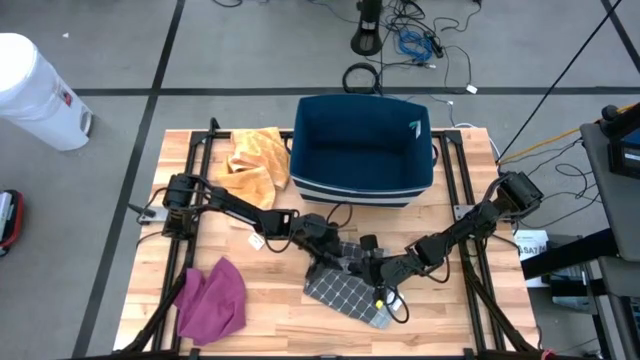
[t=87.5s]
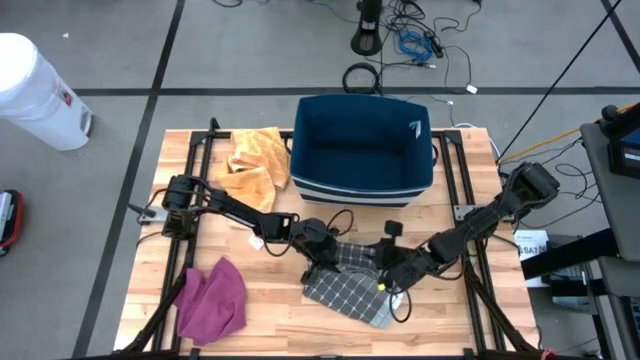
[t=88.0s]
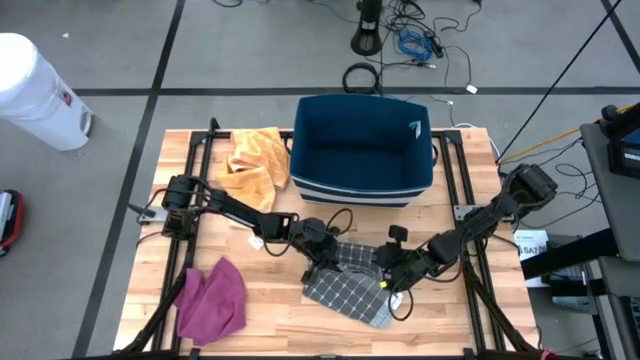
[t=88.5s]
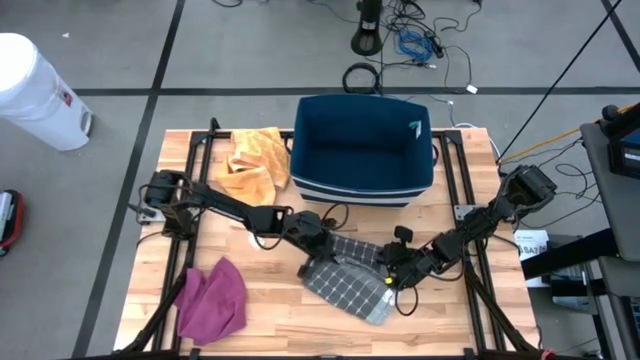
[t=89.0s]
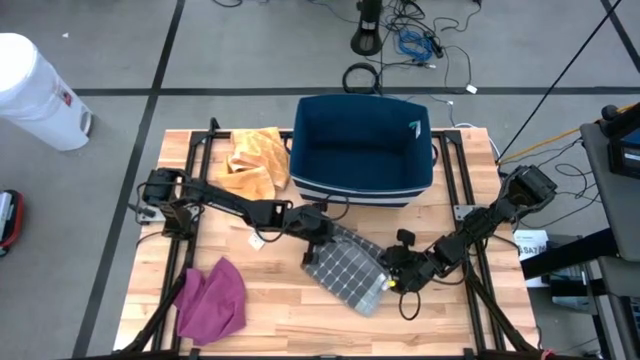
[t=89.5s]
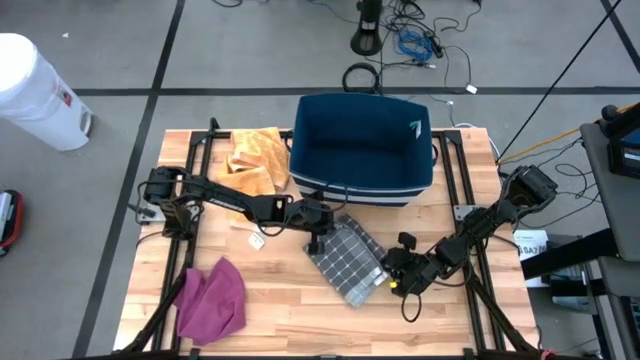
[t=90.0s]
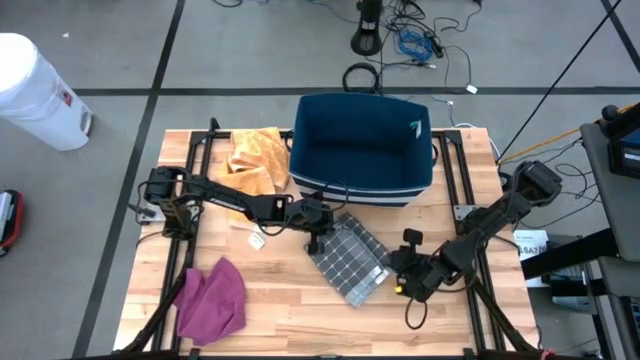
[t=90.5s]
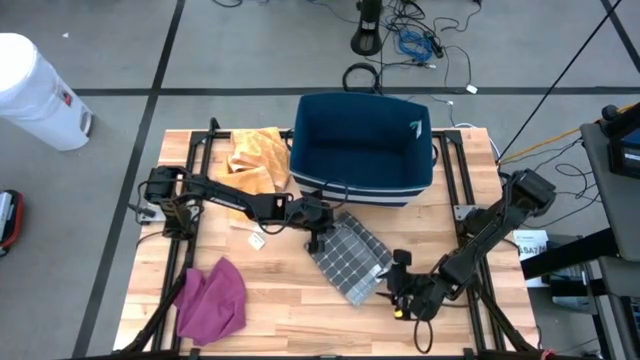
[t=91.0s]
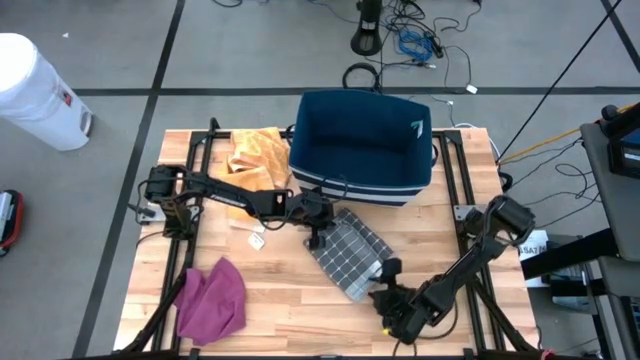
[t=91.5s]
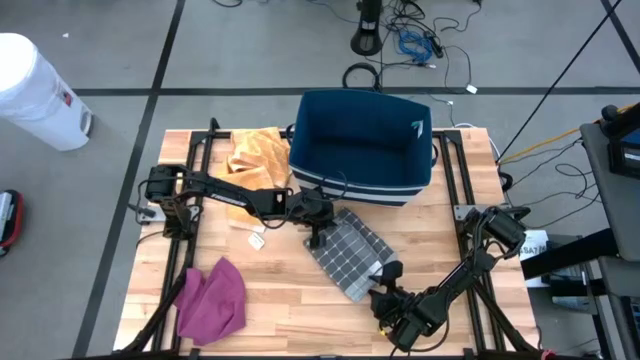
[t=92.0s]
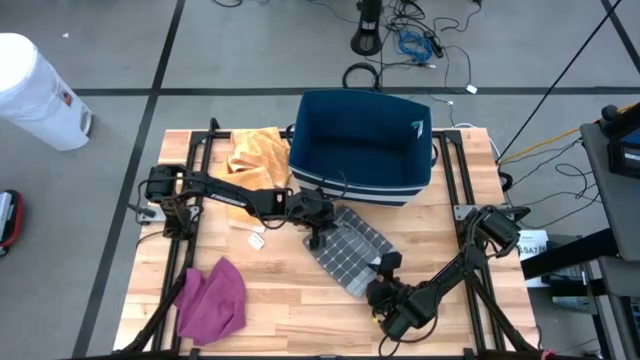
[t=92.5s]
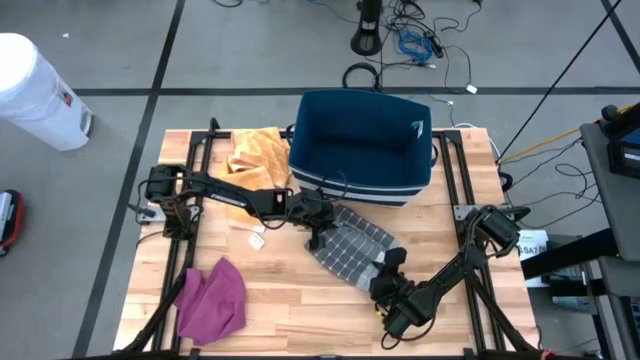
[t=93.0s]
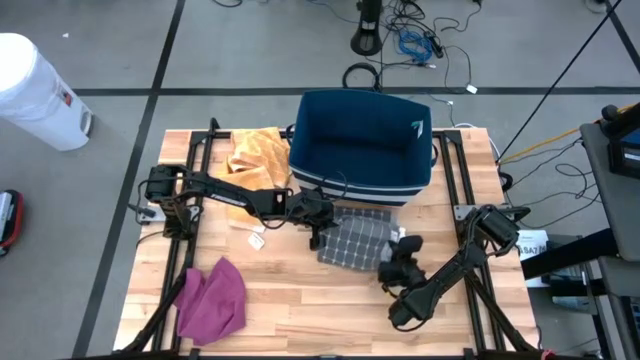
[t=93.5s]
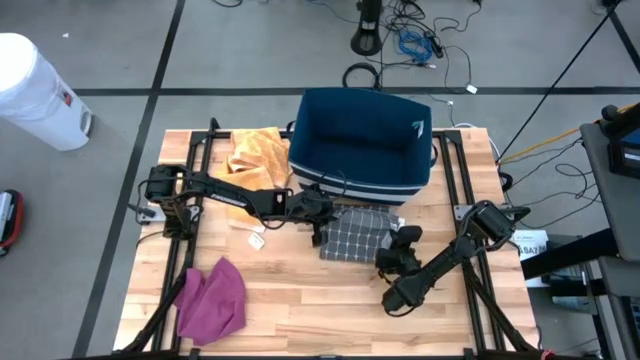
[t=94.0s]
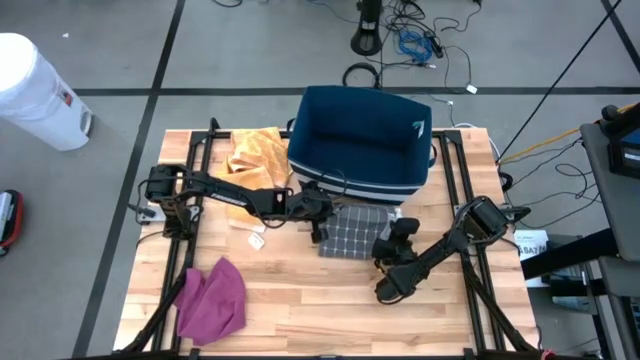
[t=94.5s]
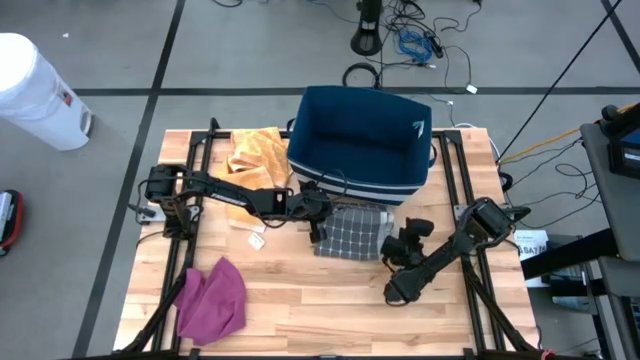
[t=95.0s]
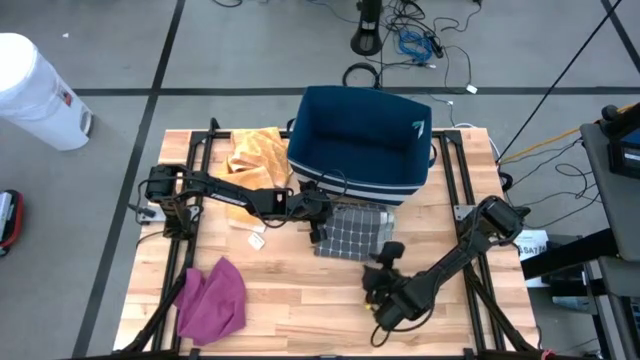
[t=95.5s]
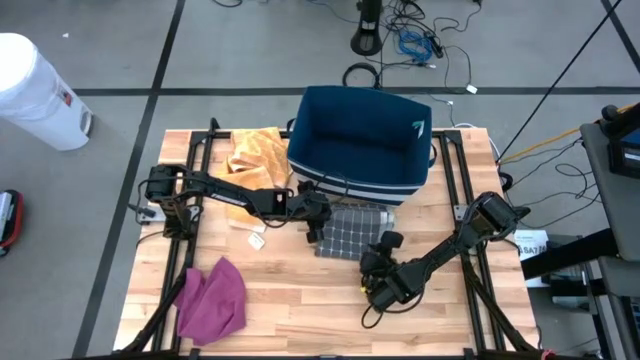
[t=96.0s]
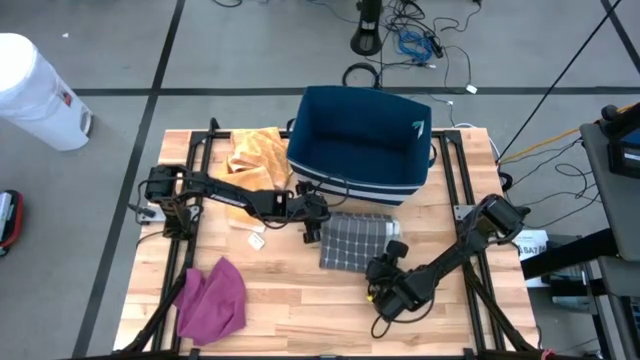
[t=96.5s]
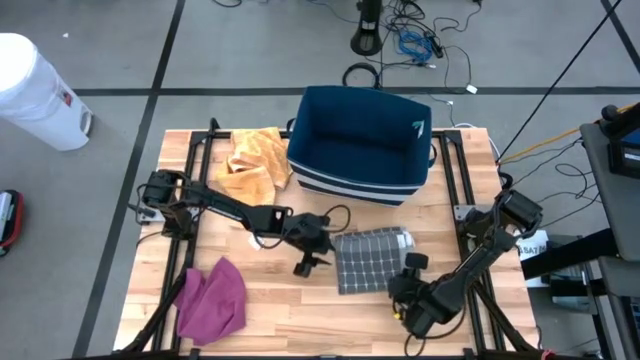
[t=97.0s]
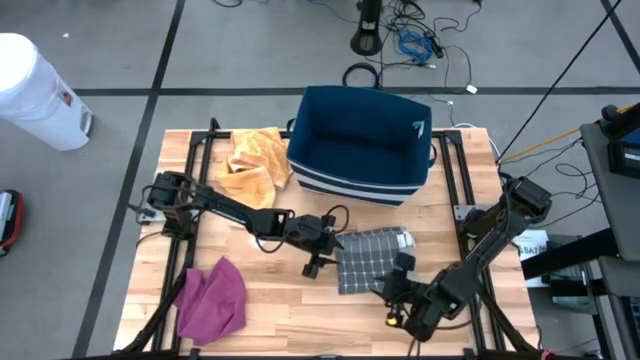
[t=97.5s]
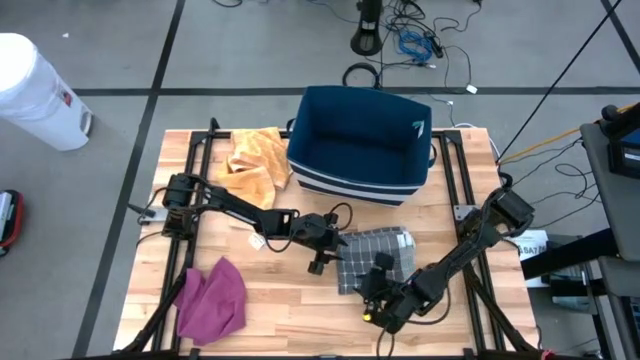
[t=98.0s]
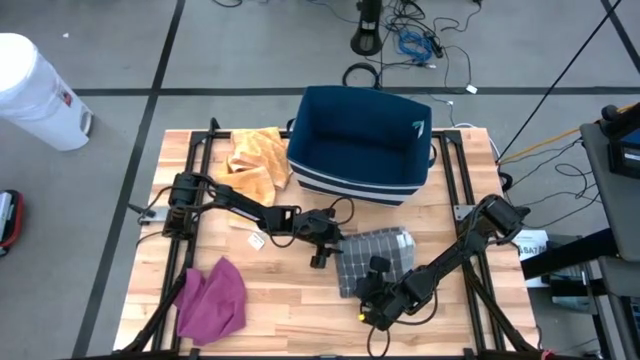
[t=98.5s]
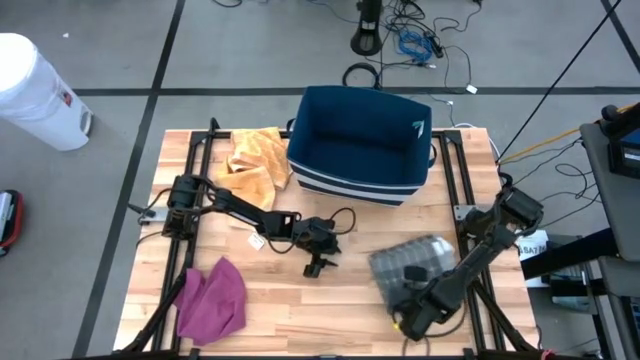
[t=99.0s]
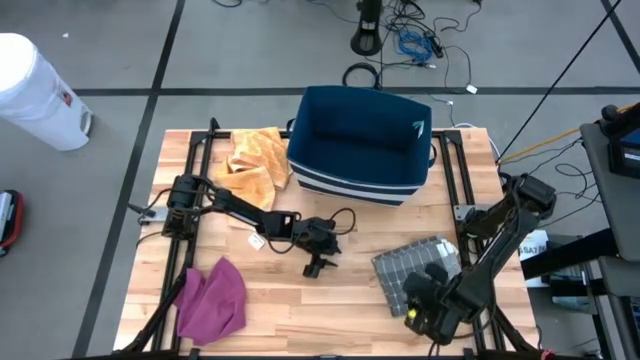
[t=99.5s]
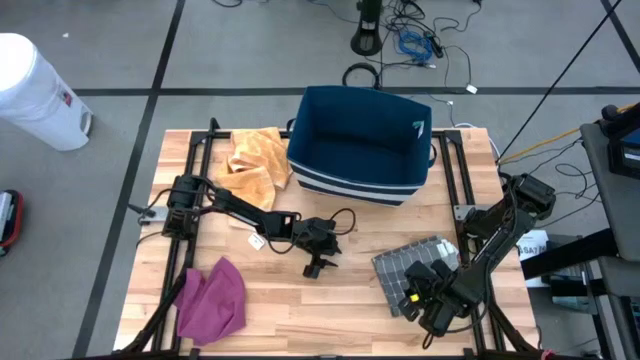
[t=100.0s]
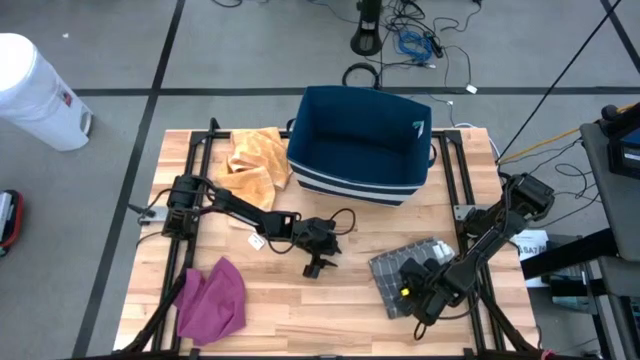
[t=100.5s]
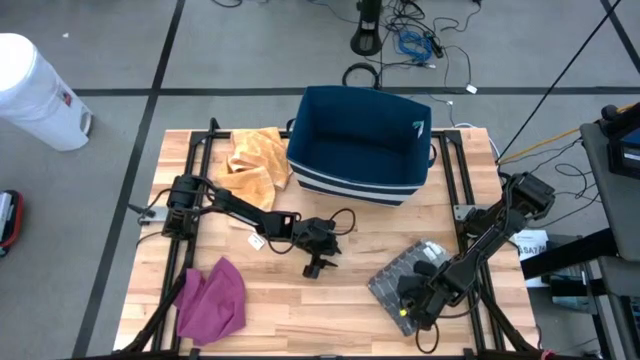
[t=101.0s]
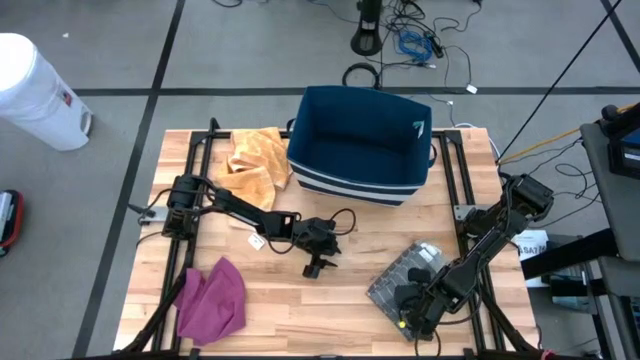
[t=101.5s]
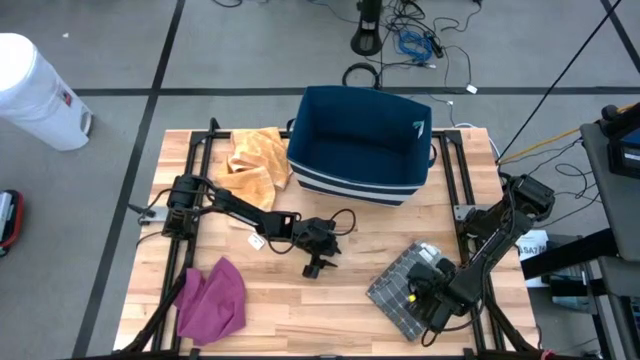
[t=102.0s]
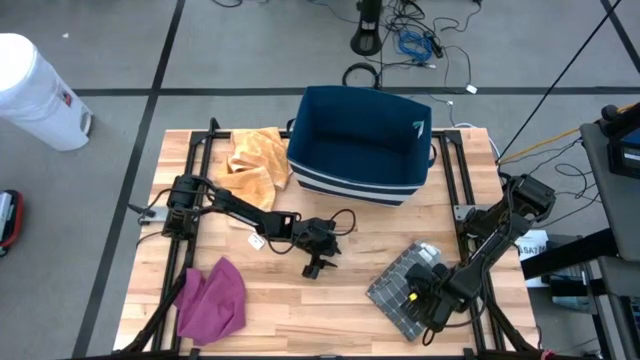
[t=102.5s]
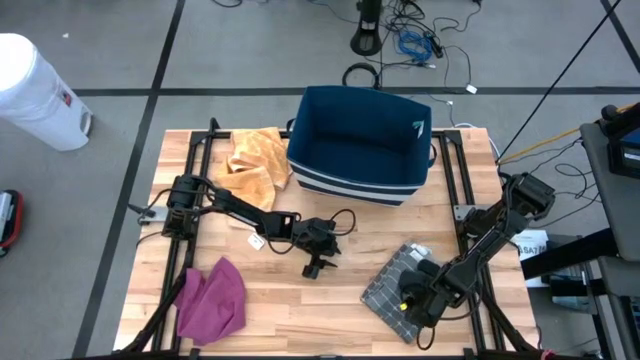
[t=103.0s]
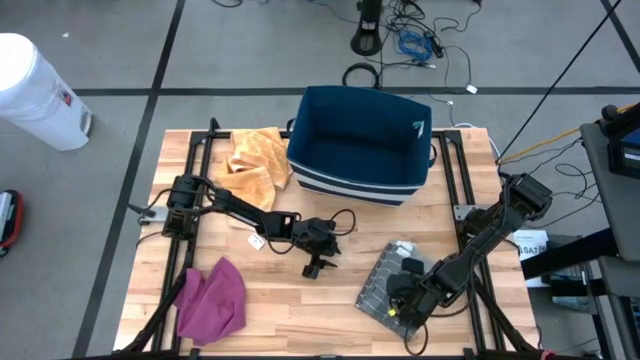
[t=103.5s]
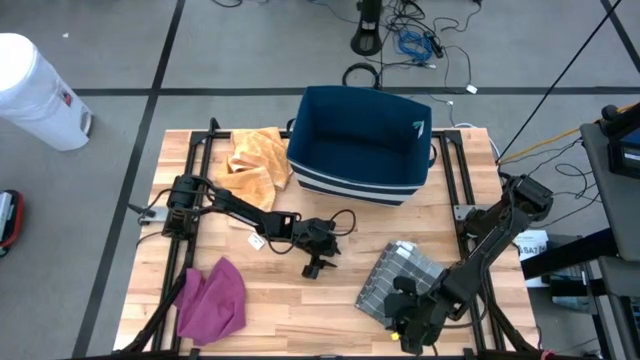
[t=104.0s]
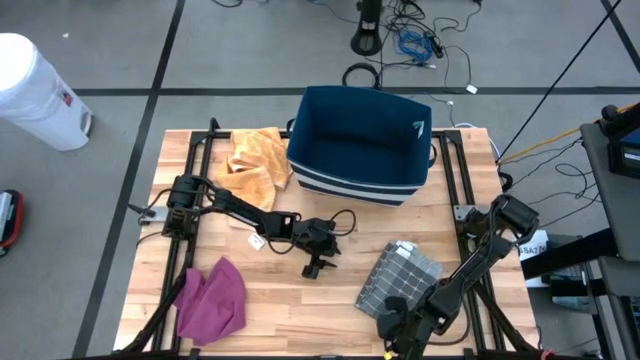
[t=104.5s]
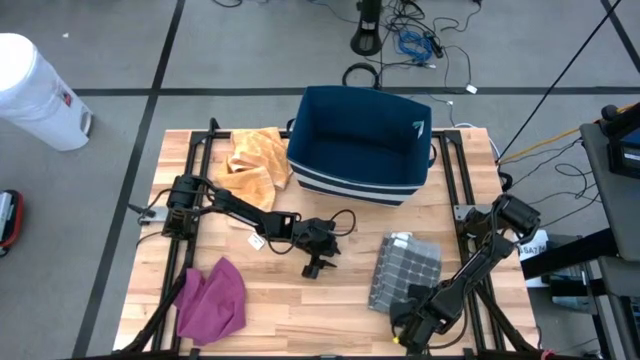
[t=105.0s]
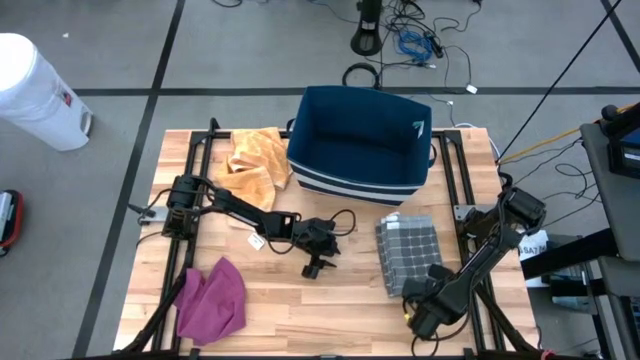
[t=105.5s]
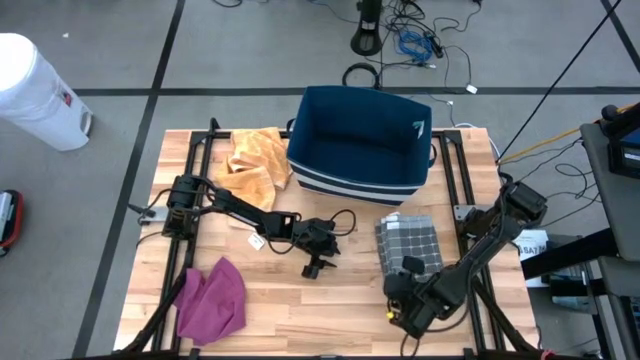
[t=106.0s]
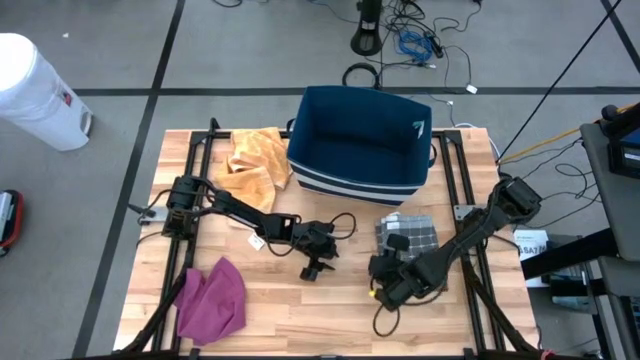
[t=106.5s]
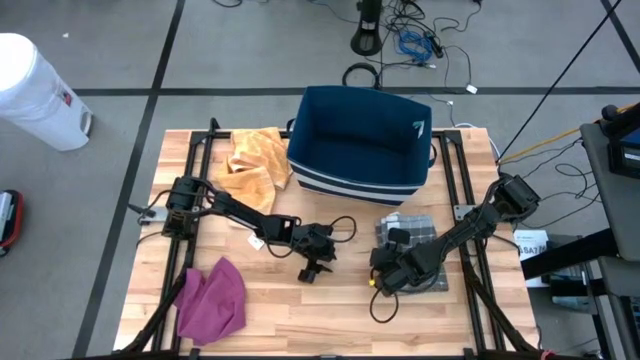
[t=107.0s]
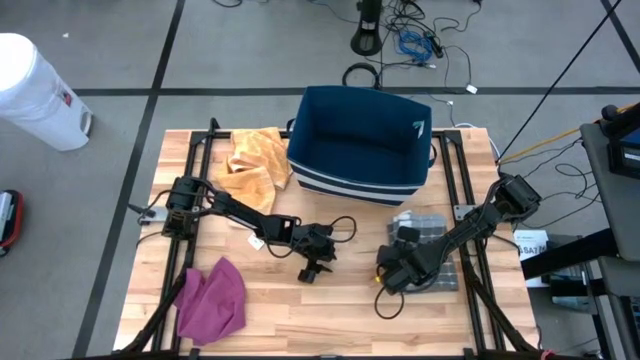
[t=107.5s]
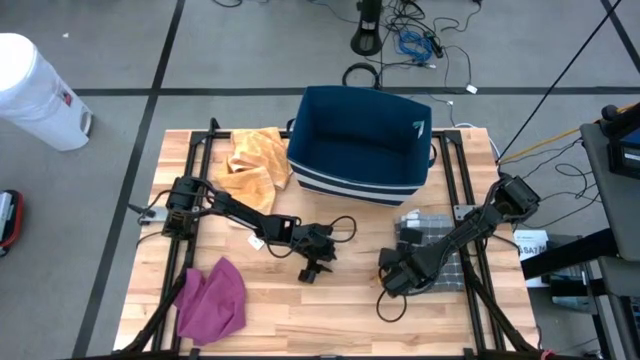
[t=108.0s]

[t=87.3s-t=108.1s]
Task: Fold towel
Fold the gray patterned towel
